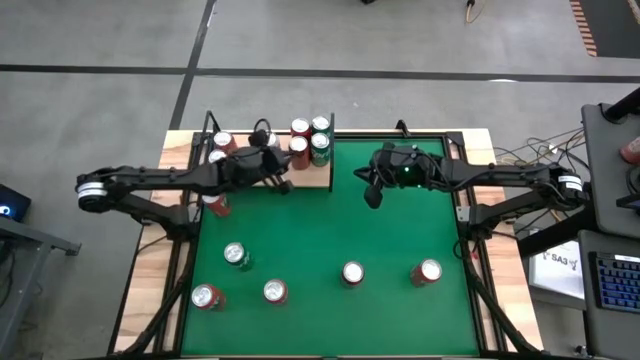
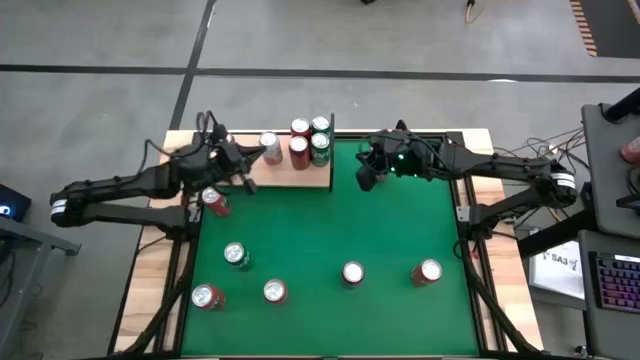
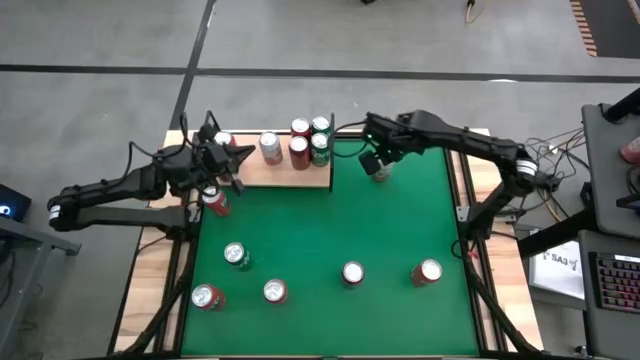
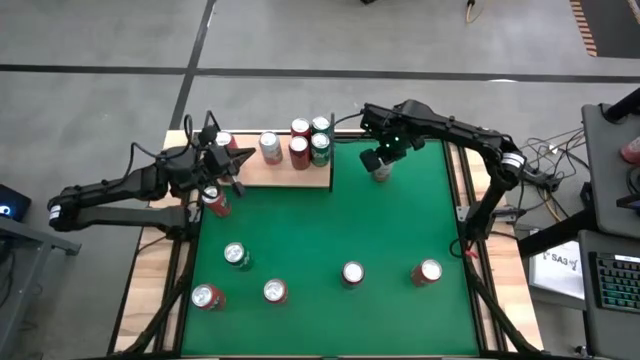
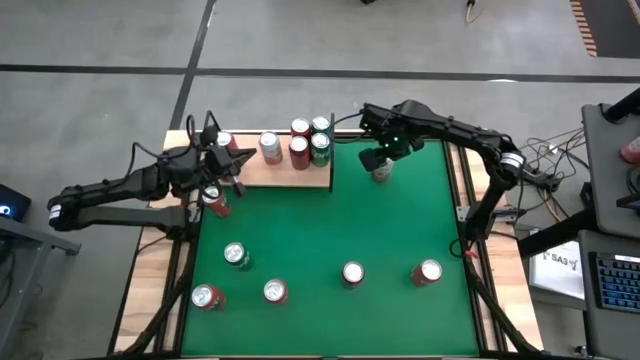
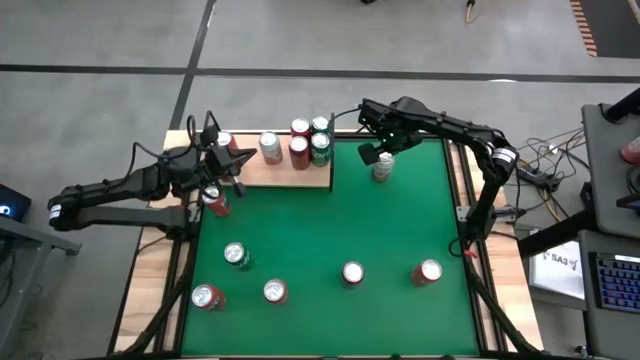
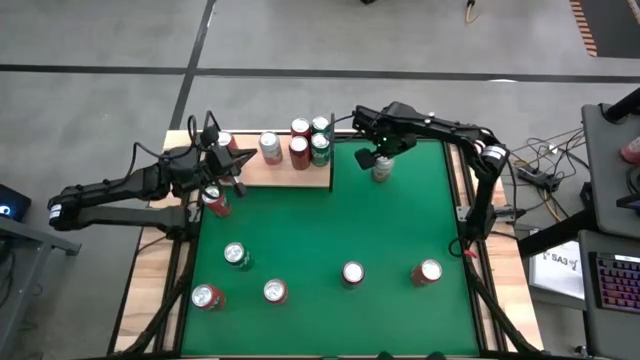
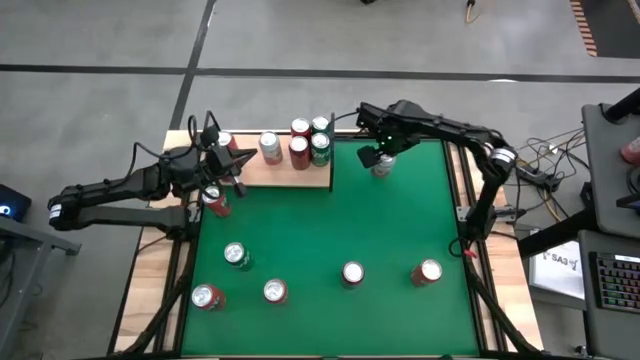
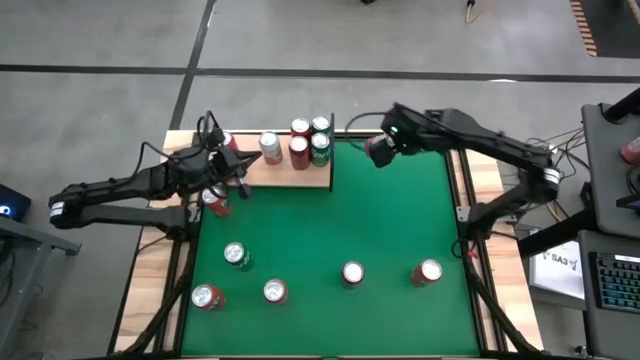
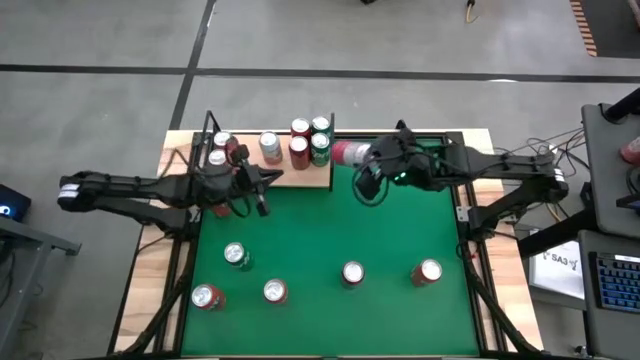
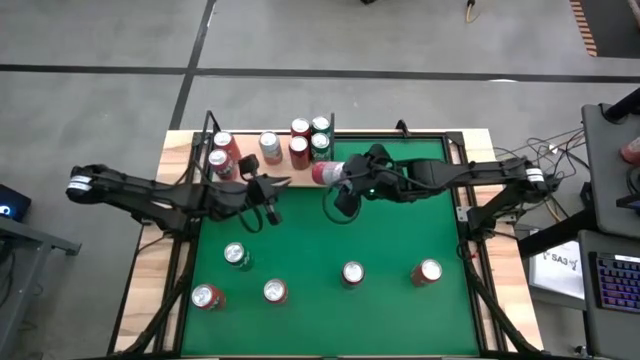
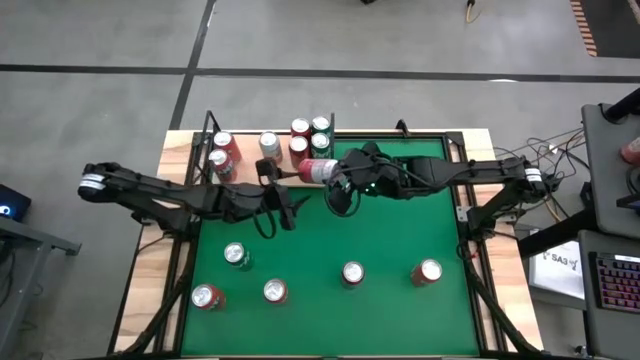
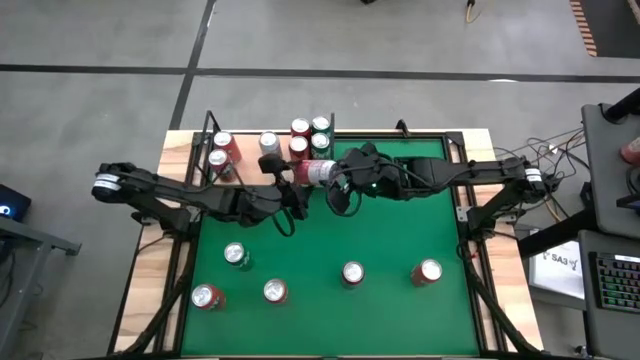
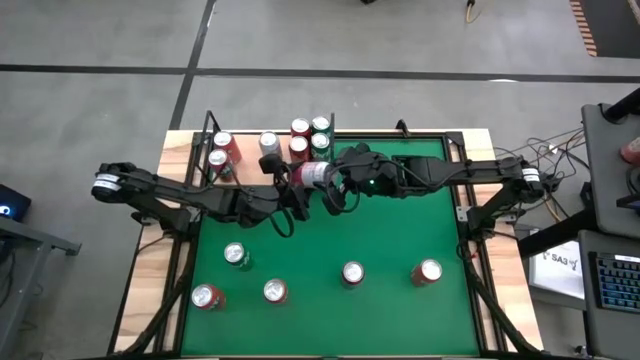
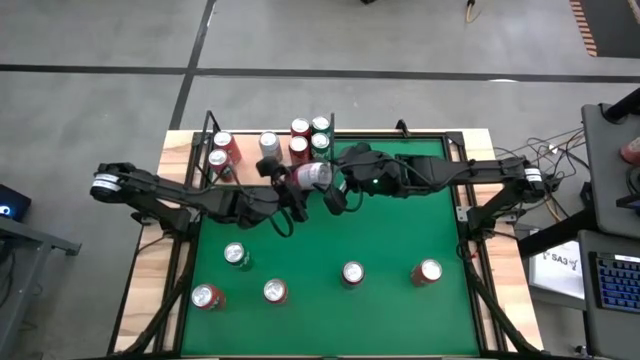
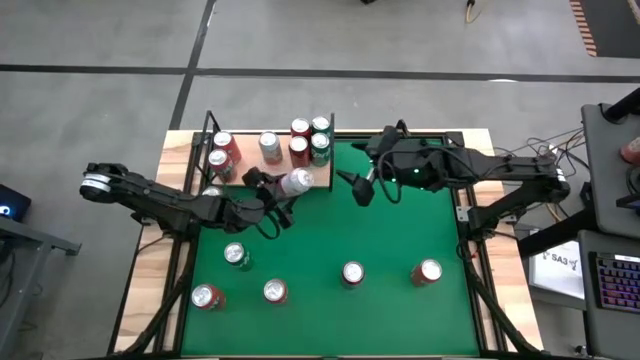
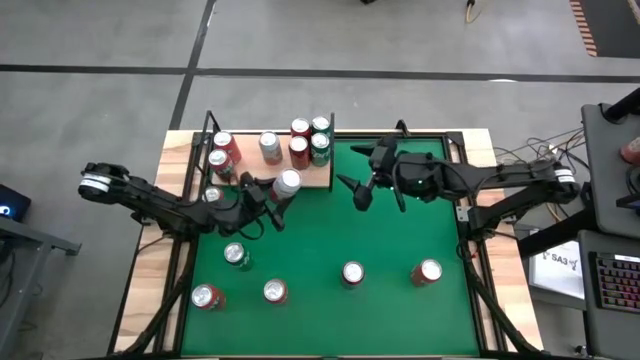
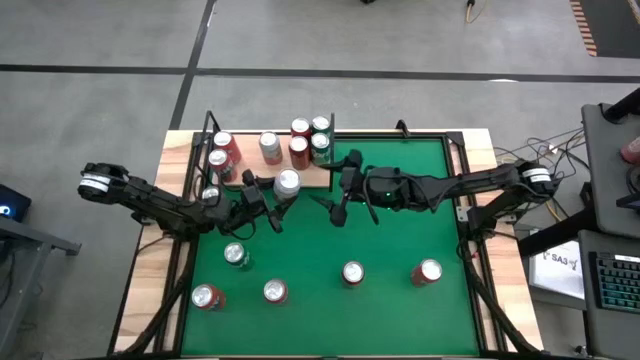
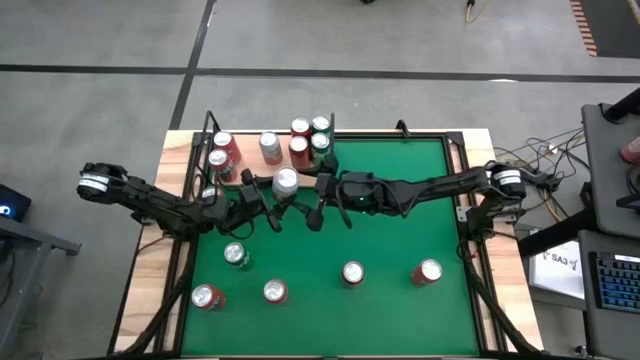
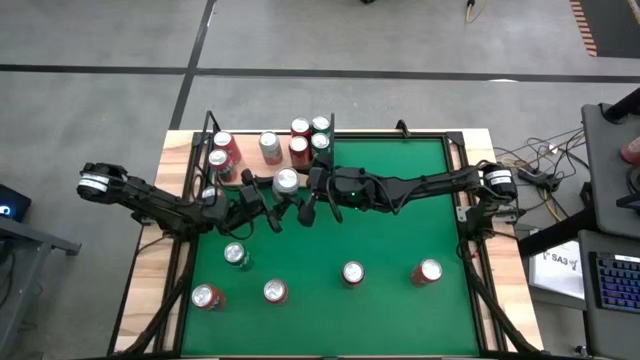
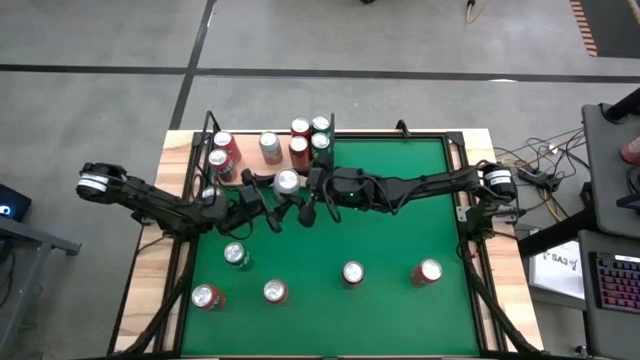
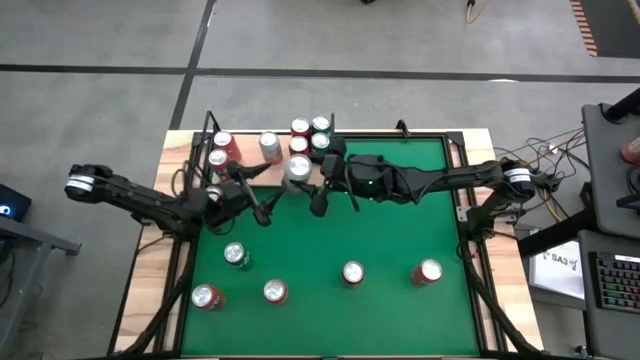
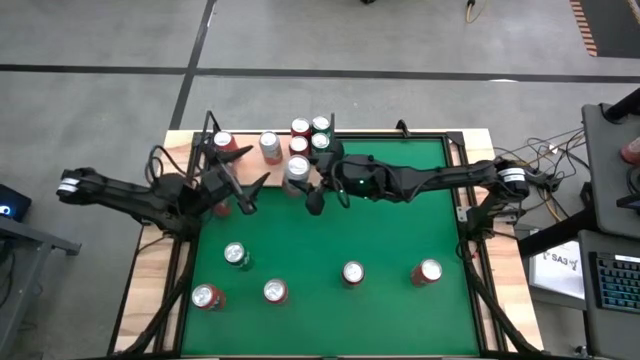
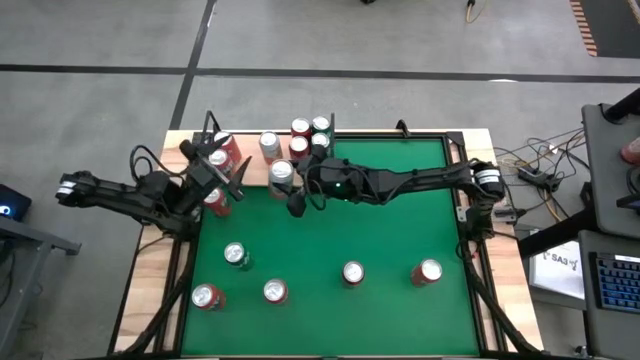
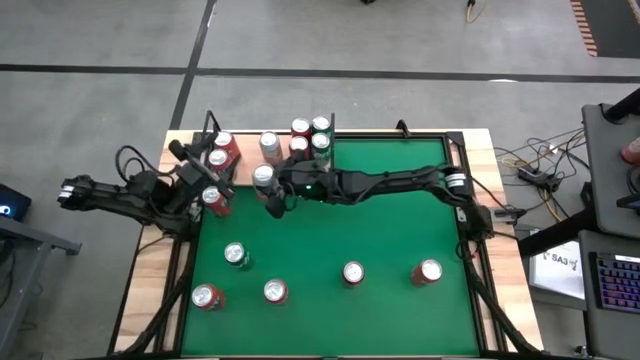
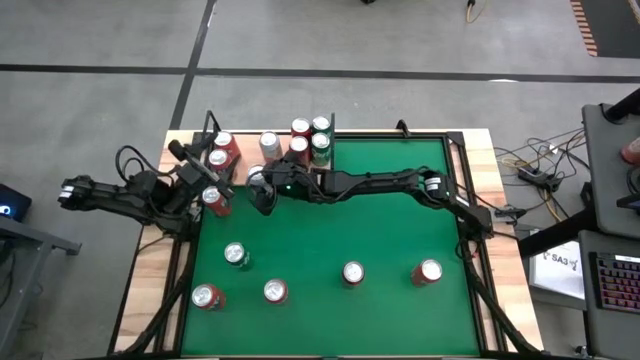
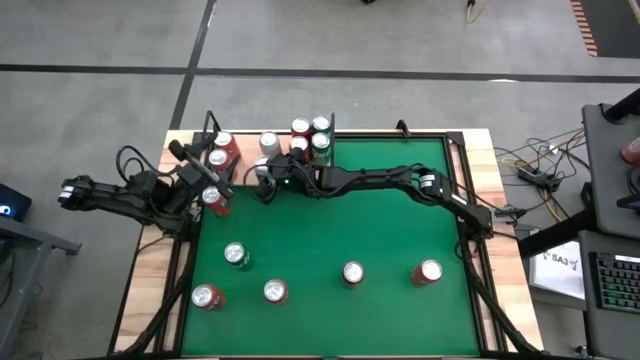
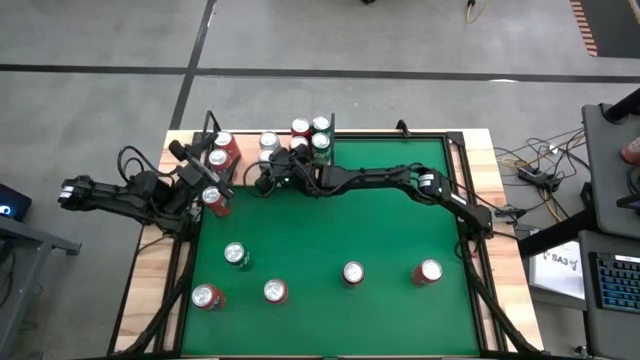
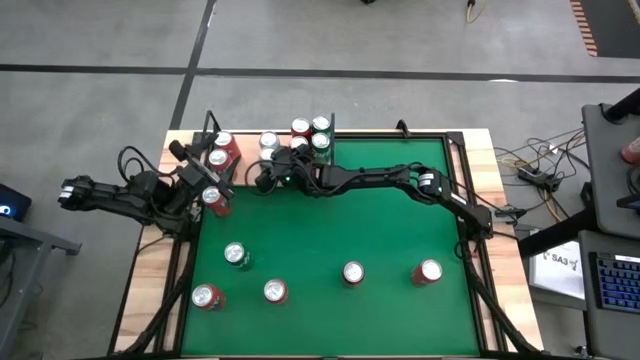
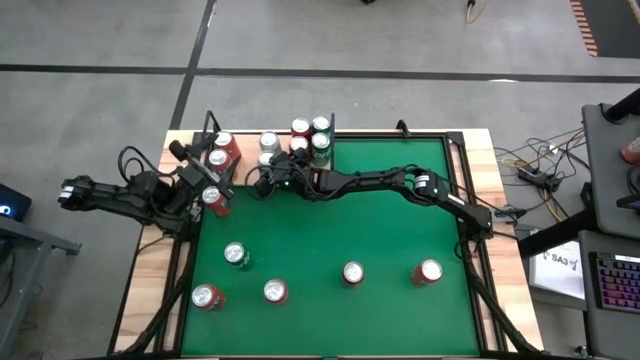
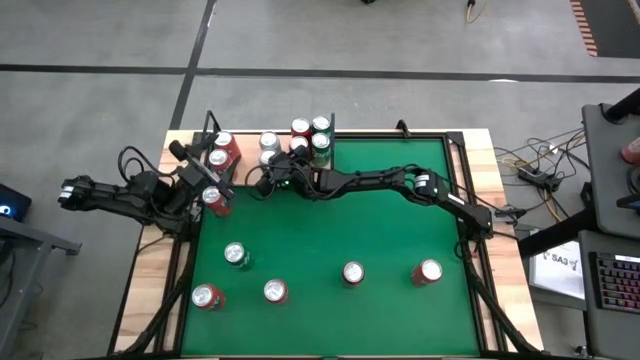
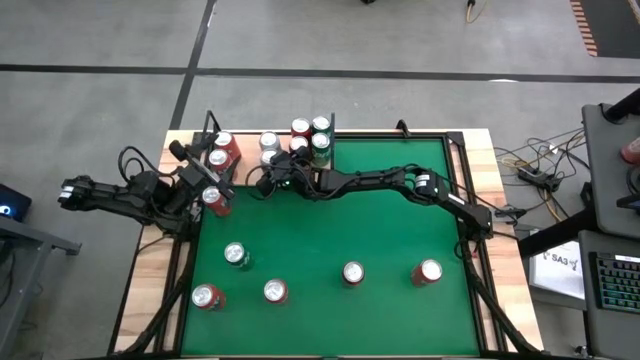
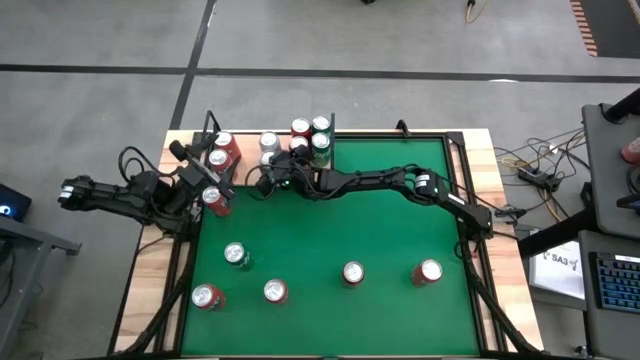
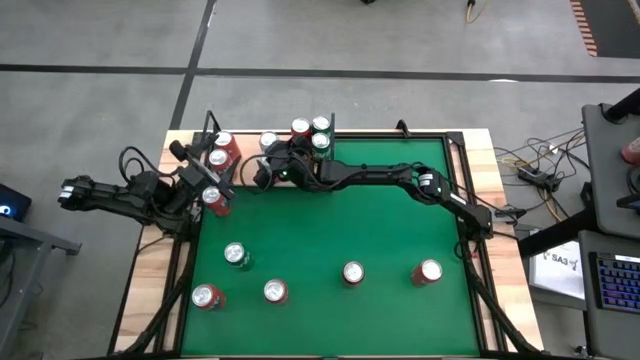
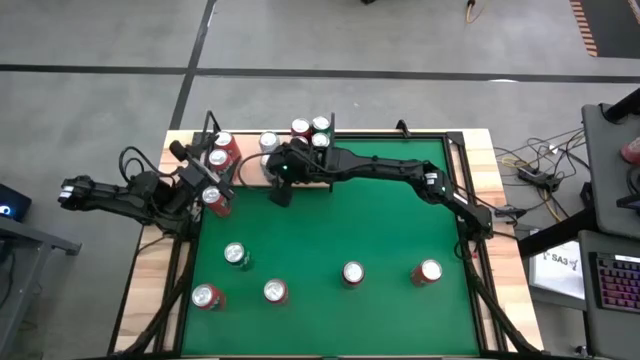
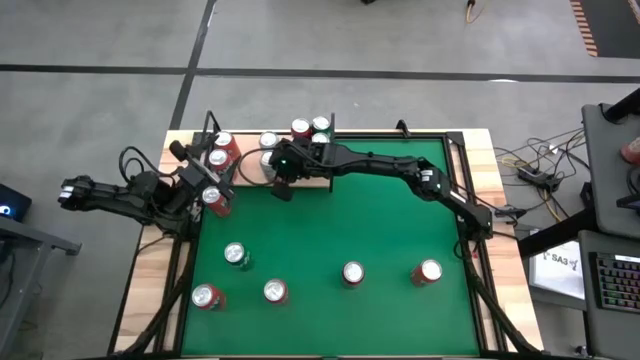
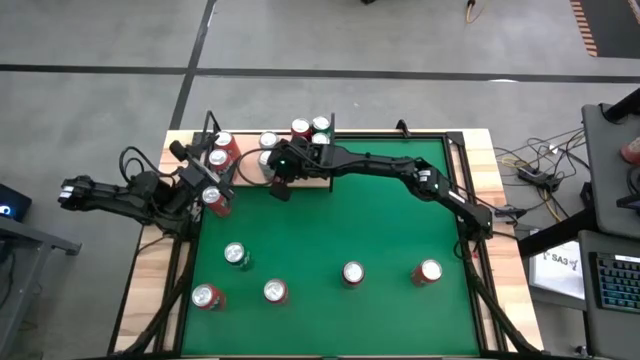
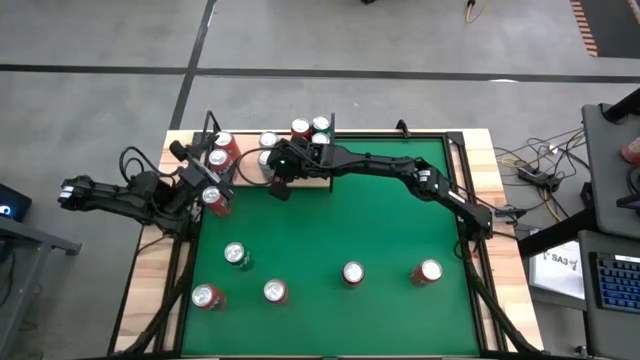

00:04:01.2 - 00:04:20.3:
Task: Place canned beverage on shelf
Put the pink-white soda can on the shelf aligned with the other pink-white soda can
